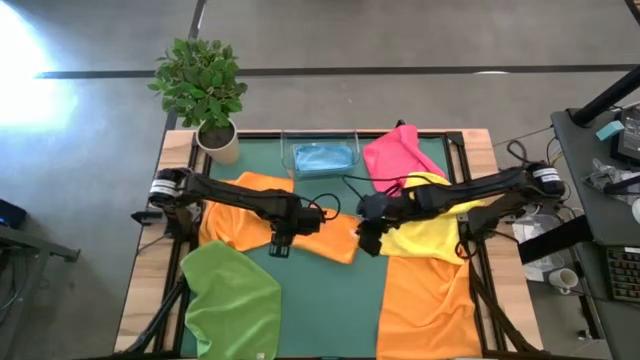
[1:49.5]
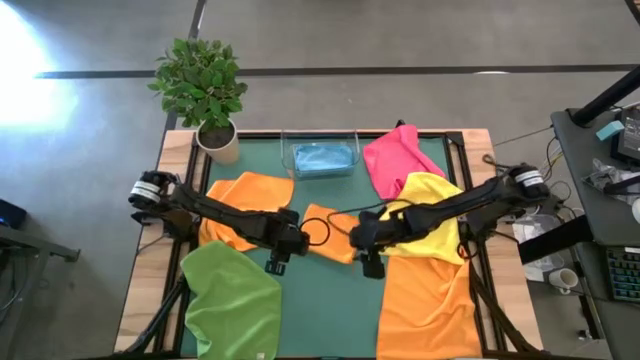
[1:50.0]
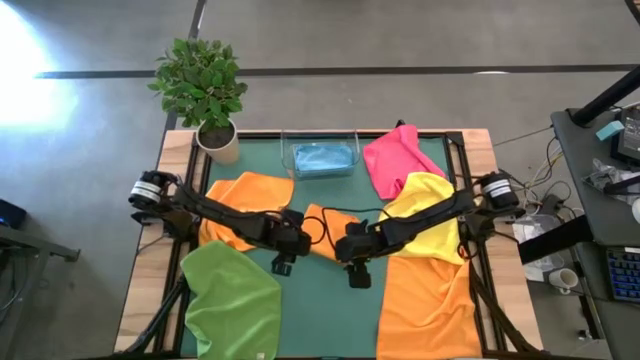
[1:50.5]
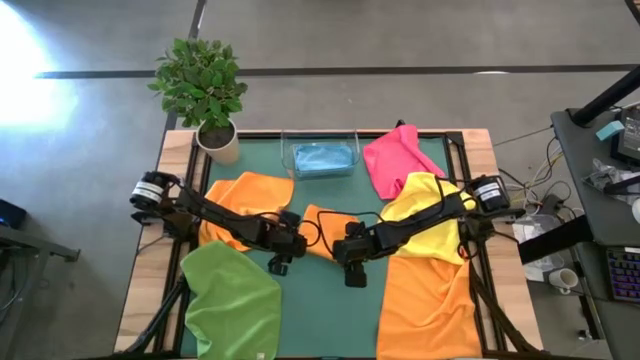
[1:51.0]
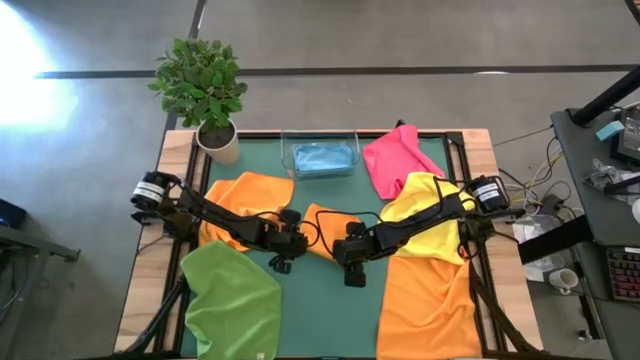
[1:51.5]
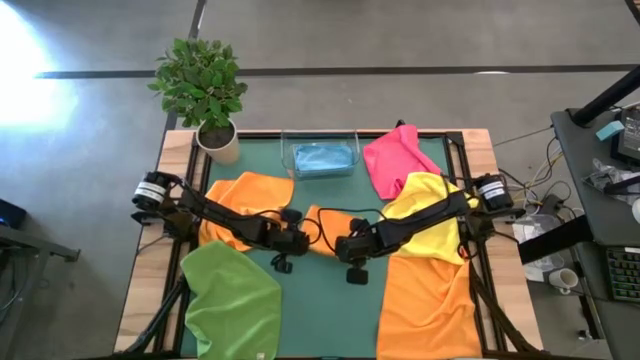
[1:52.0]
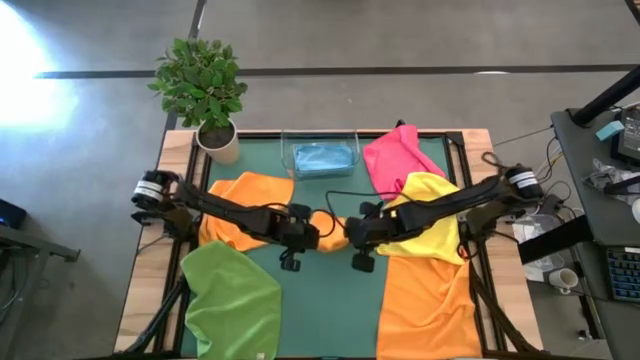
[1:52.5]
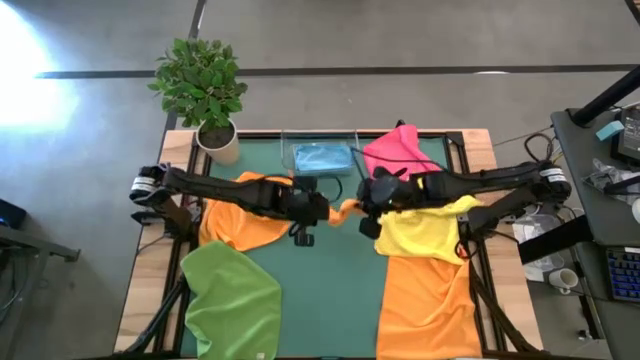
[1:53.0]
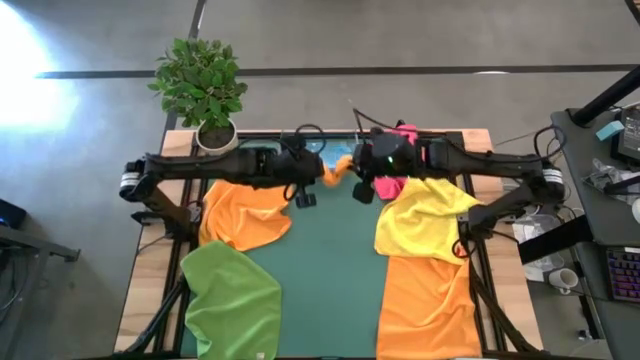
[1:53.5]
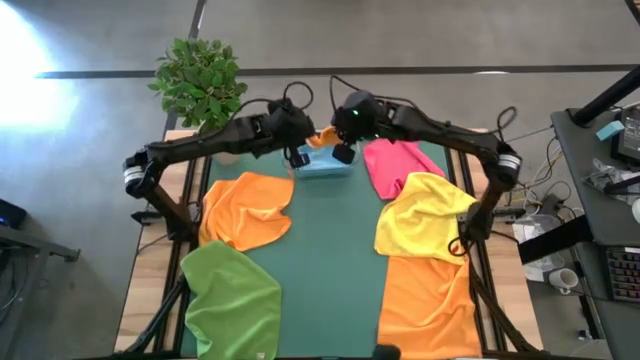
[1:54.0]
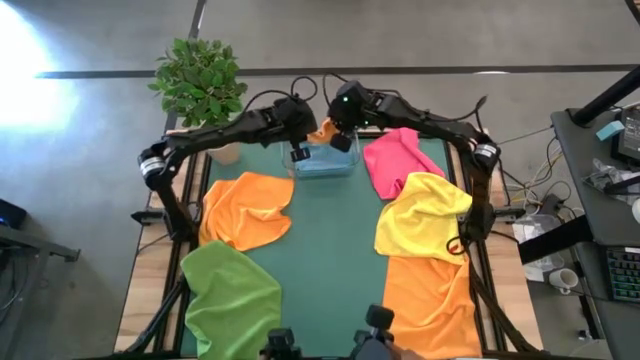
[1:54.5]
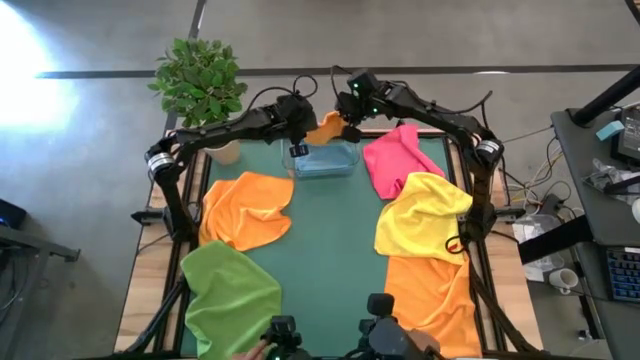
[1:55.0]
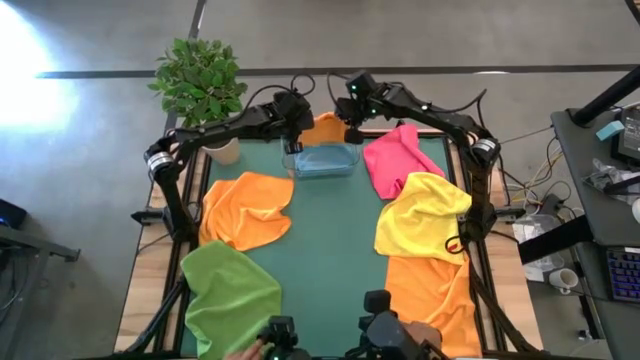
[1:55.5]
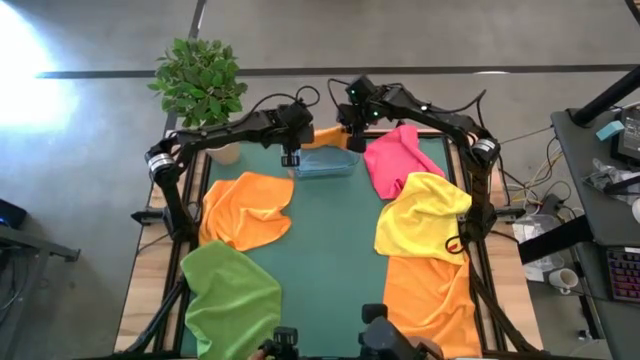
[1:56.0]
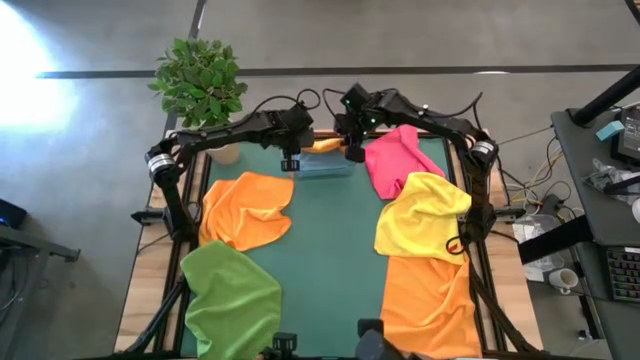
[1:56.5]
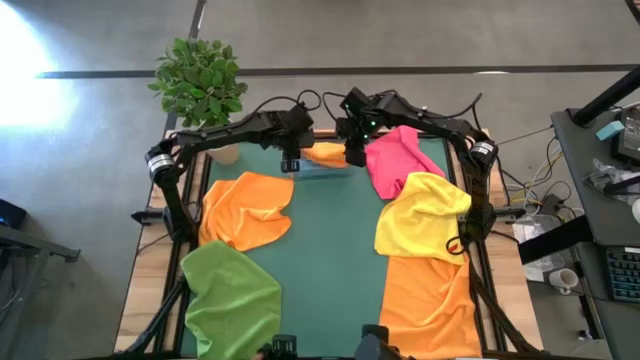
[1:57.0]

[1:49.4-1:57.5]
Task: Fold microfiber towels
Put the right folded orange microfiber towel into the transparent bin
